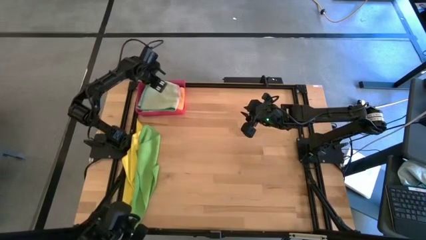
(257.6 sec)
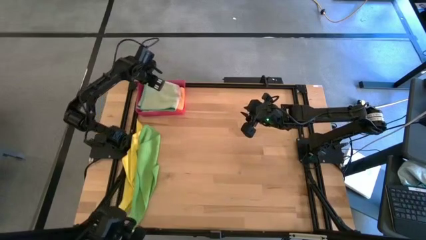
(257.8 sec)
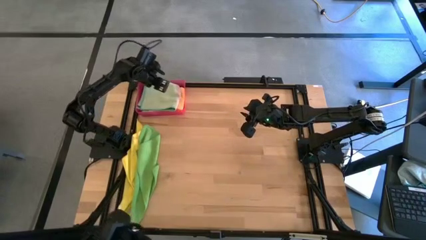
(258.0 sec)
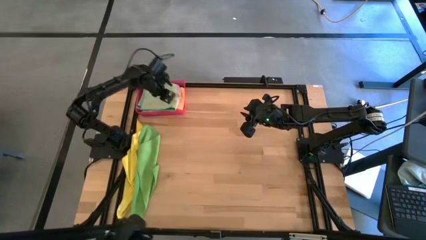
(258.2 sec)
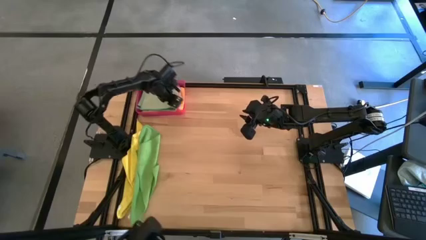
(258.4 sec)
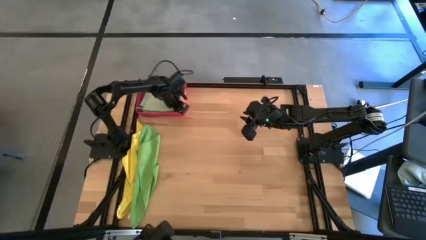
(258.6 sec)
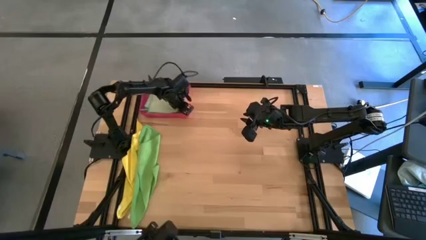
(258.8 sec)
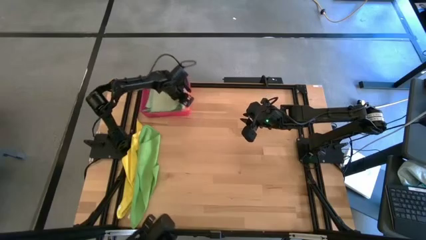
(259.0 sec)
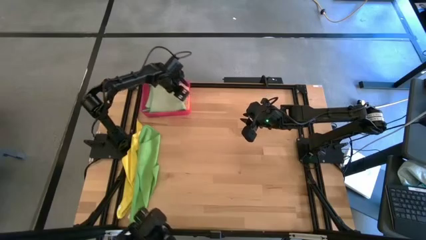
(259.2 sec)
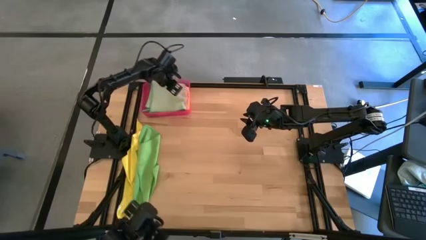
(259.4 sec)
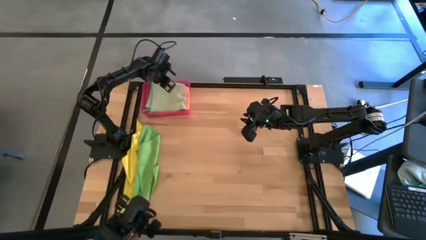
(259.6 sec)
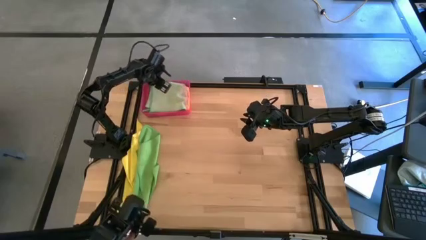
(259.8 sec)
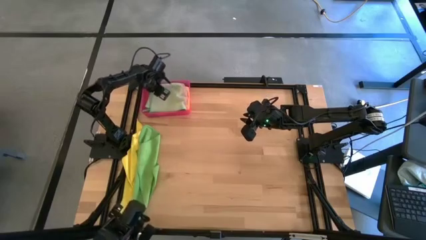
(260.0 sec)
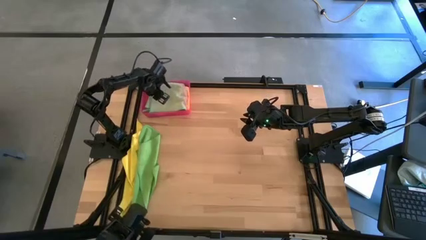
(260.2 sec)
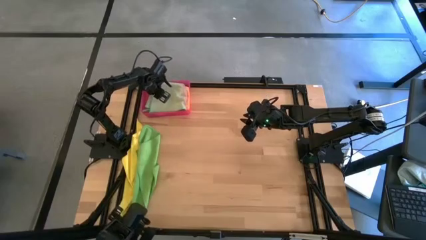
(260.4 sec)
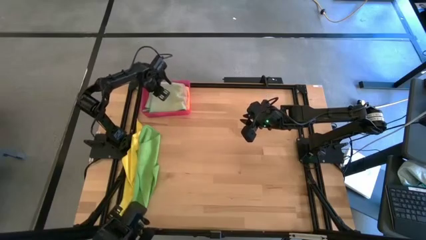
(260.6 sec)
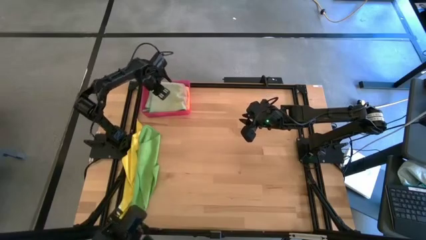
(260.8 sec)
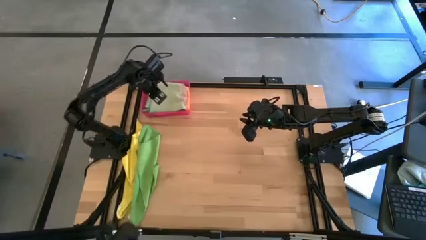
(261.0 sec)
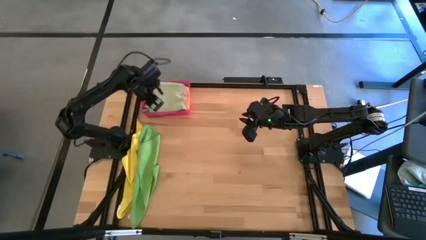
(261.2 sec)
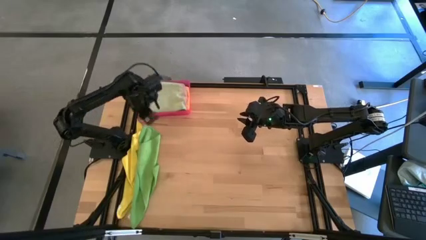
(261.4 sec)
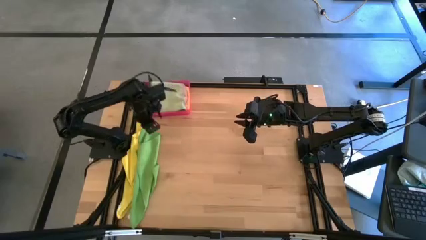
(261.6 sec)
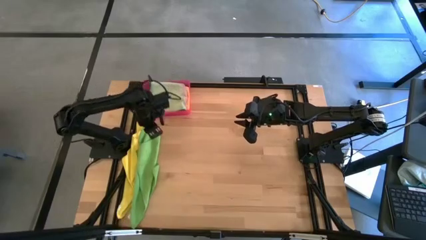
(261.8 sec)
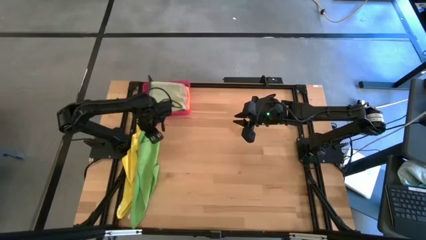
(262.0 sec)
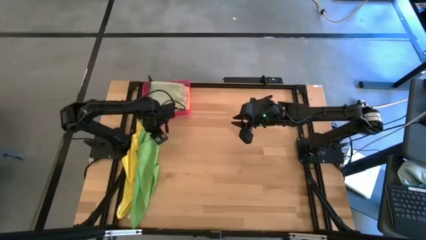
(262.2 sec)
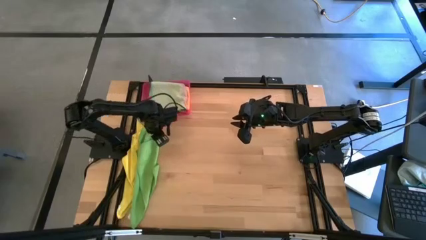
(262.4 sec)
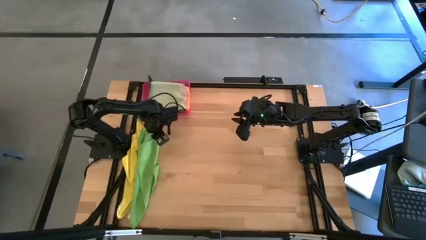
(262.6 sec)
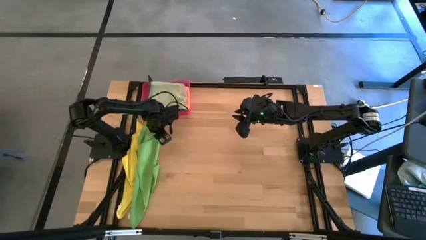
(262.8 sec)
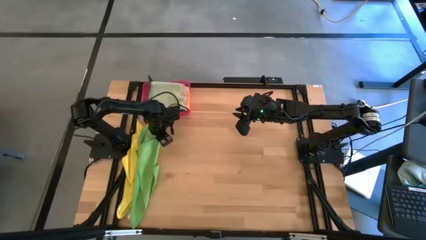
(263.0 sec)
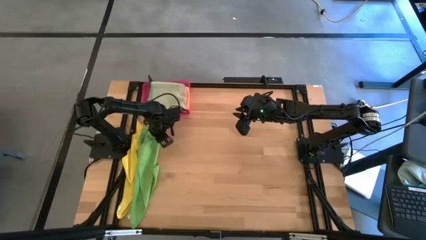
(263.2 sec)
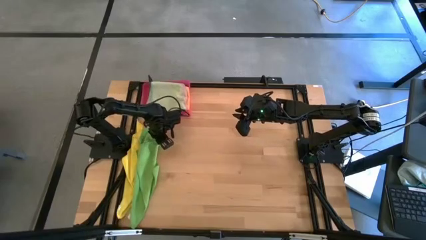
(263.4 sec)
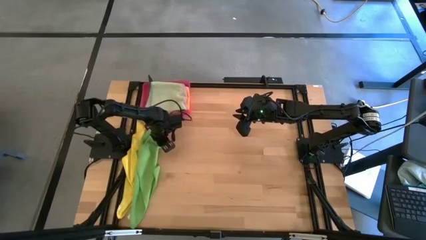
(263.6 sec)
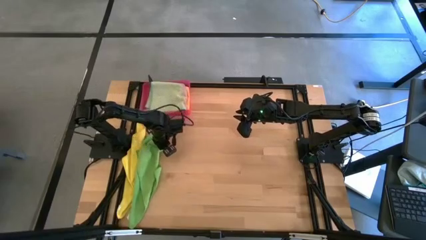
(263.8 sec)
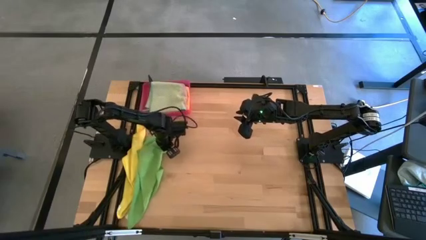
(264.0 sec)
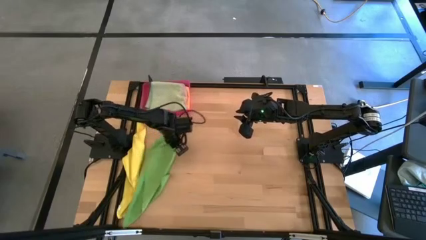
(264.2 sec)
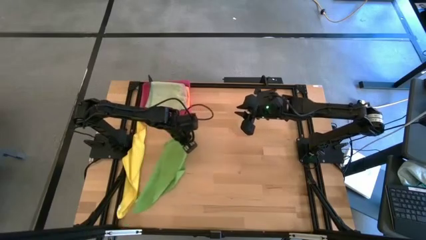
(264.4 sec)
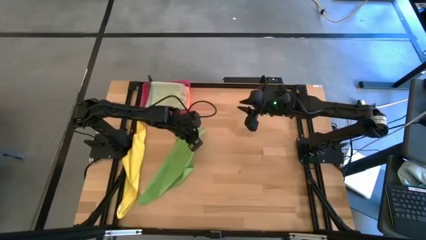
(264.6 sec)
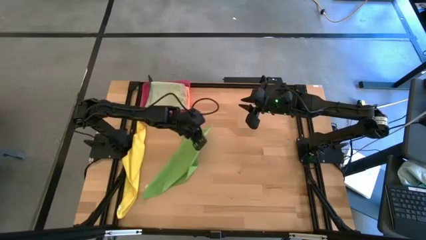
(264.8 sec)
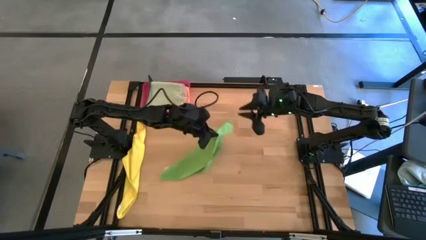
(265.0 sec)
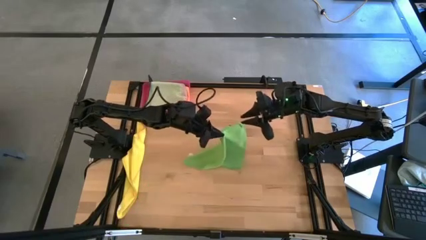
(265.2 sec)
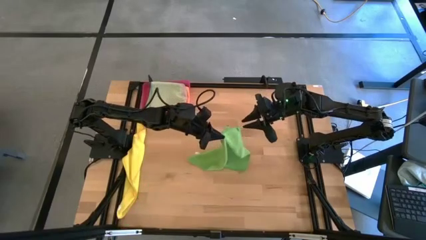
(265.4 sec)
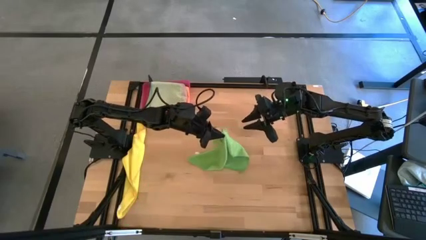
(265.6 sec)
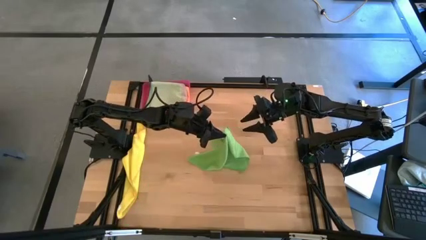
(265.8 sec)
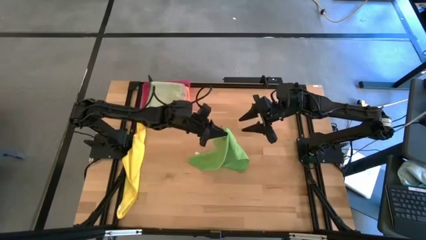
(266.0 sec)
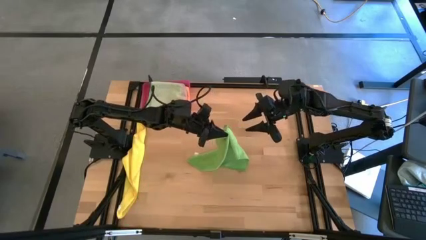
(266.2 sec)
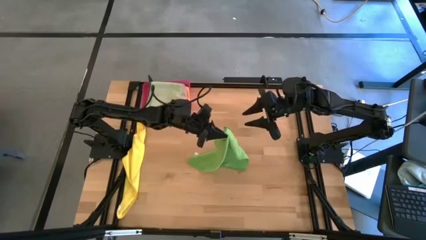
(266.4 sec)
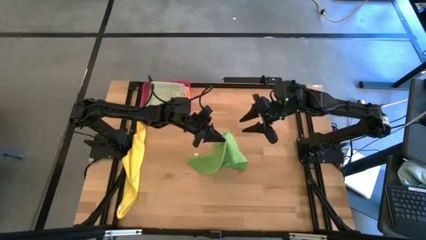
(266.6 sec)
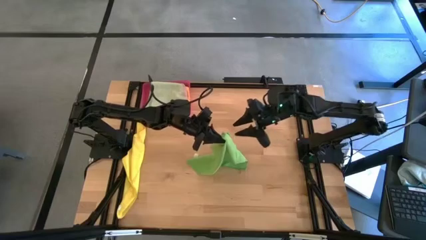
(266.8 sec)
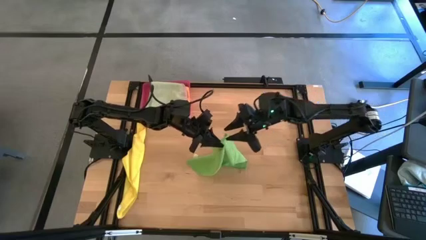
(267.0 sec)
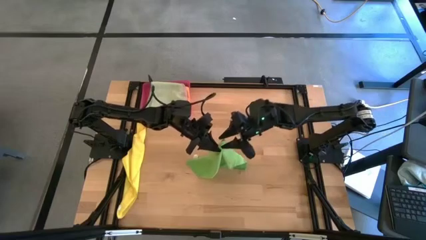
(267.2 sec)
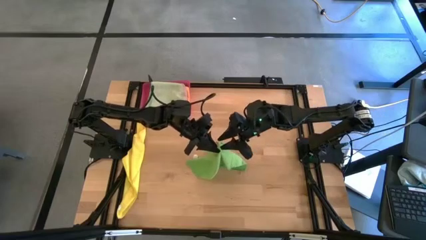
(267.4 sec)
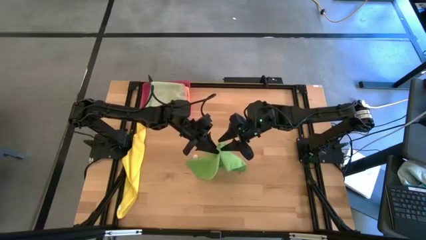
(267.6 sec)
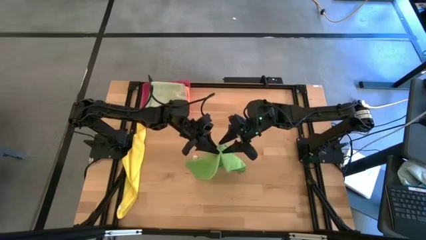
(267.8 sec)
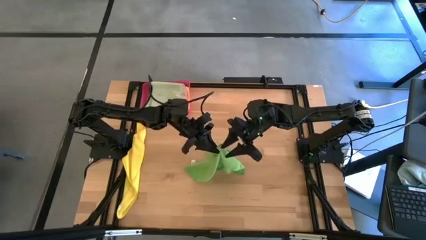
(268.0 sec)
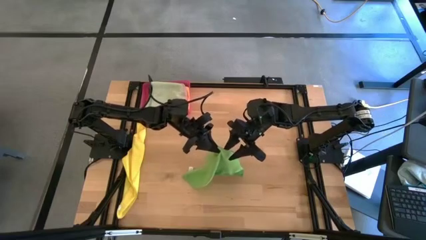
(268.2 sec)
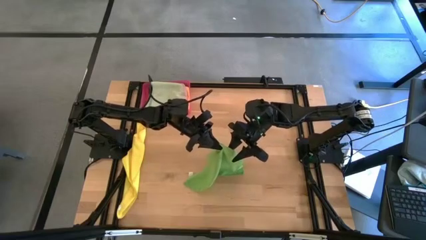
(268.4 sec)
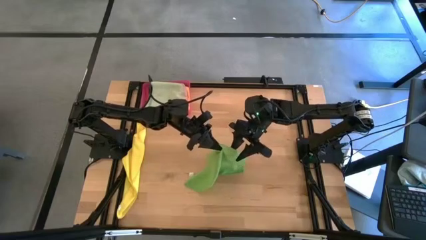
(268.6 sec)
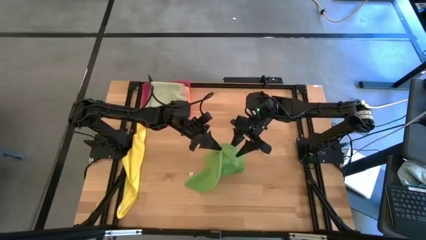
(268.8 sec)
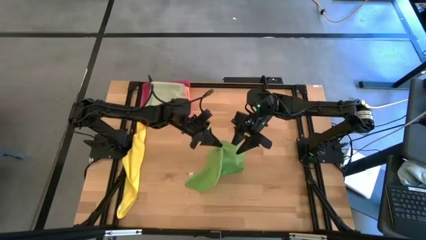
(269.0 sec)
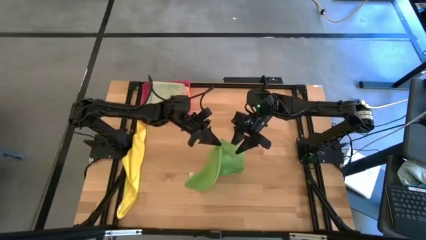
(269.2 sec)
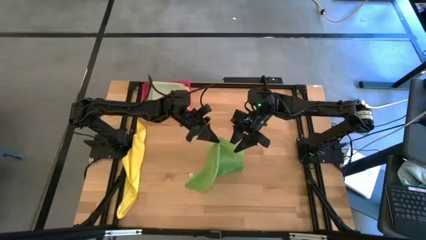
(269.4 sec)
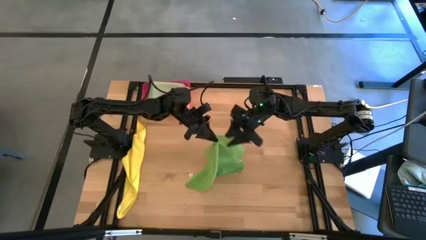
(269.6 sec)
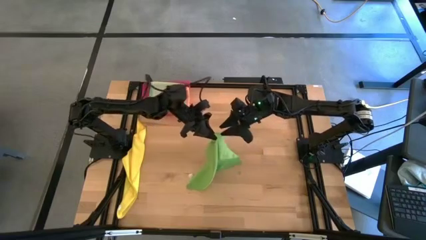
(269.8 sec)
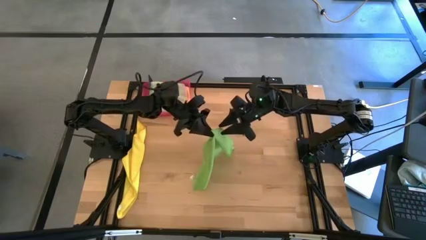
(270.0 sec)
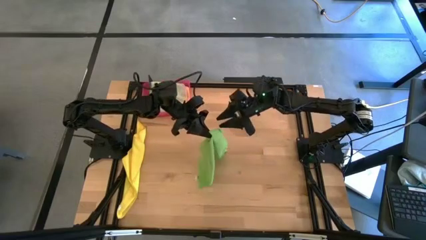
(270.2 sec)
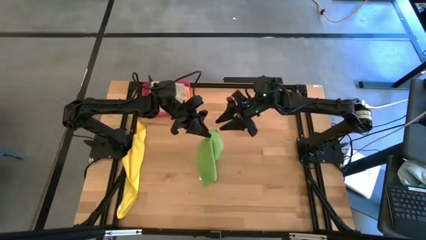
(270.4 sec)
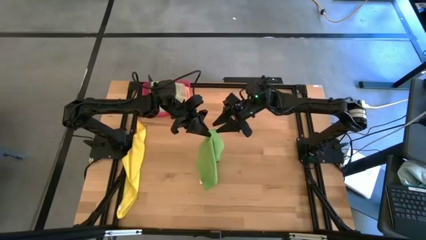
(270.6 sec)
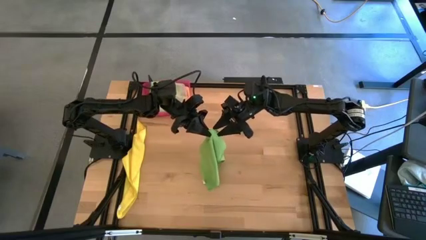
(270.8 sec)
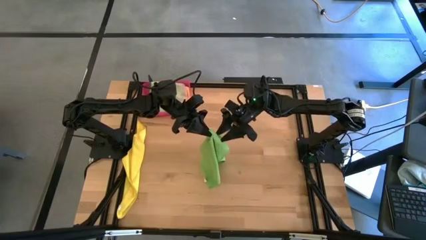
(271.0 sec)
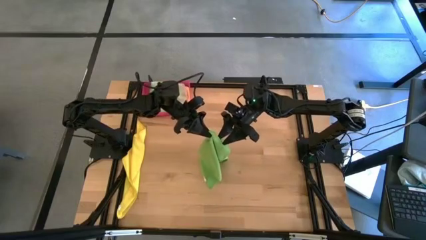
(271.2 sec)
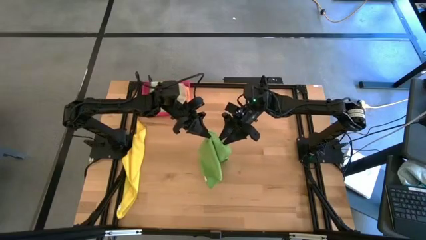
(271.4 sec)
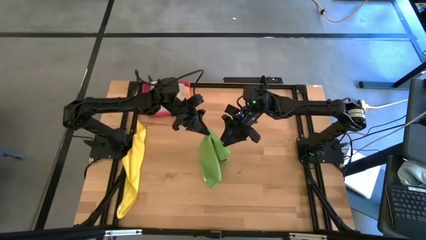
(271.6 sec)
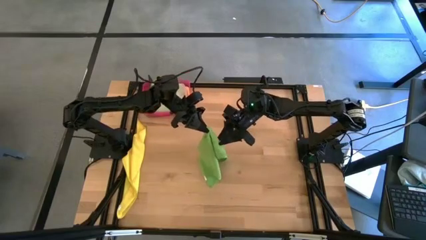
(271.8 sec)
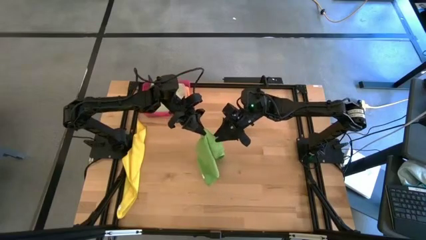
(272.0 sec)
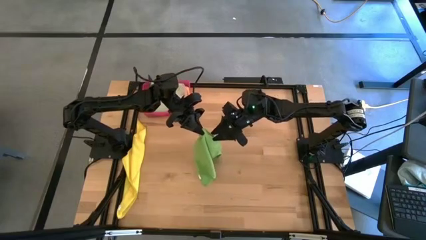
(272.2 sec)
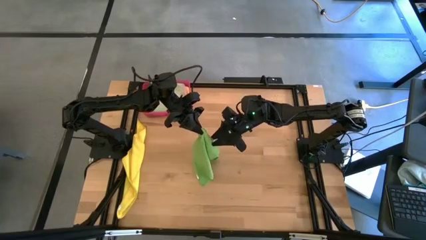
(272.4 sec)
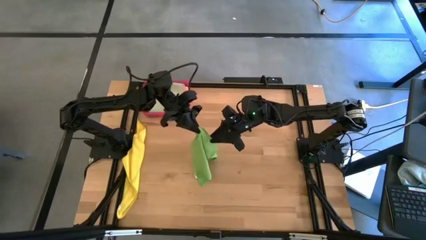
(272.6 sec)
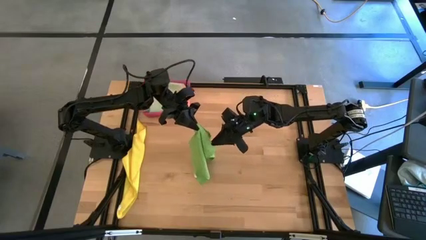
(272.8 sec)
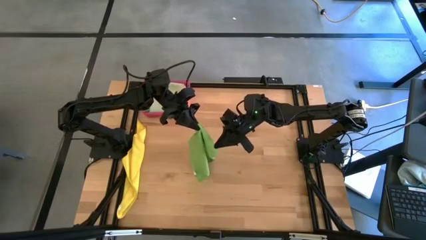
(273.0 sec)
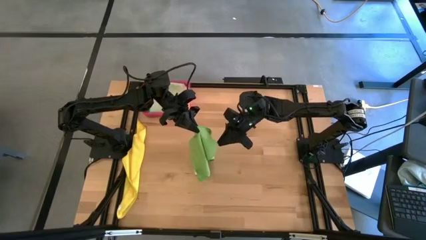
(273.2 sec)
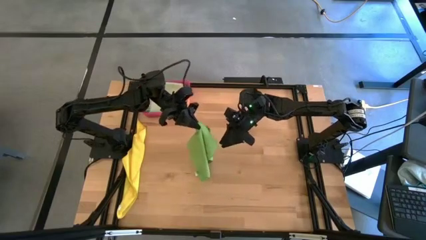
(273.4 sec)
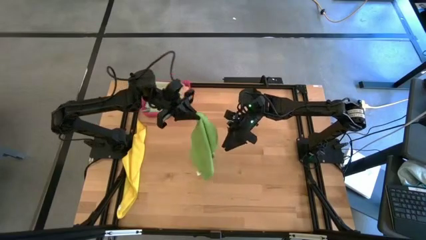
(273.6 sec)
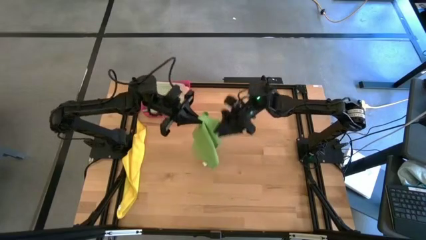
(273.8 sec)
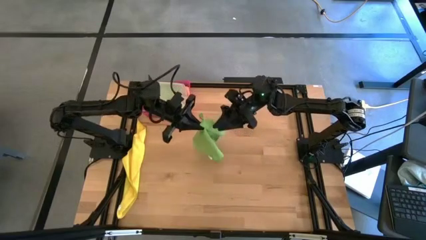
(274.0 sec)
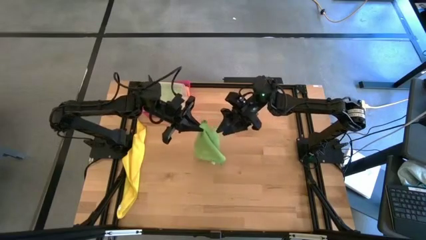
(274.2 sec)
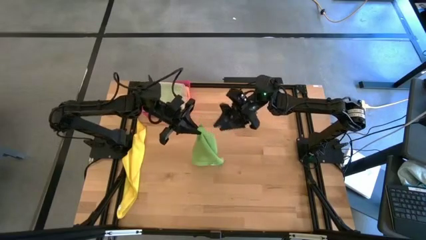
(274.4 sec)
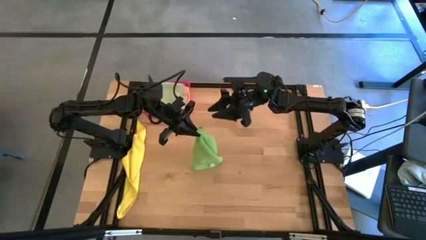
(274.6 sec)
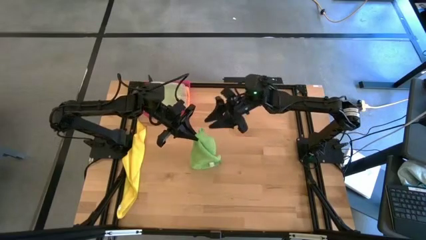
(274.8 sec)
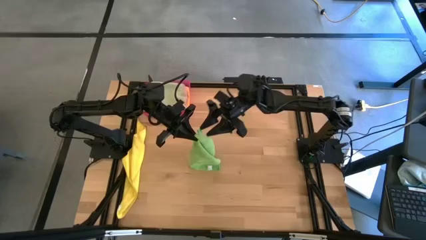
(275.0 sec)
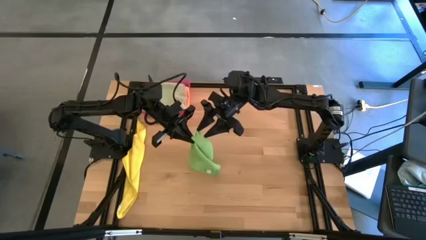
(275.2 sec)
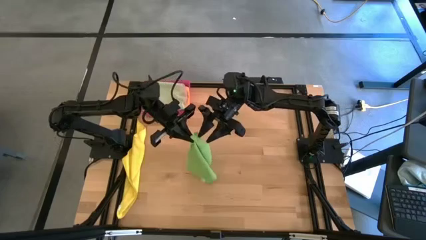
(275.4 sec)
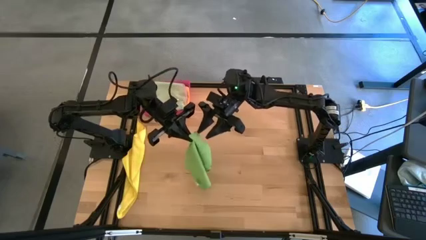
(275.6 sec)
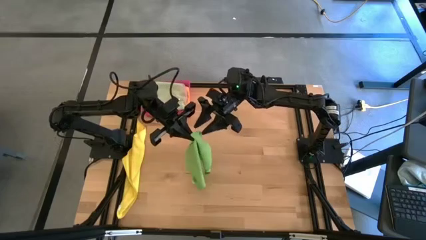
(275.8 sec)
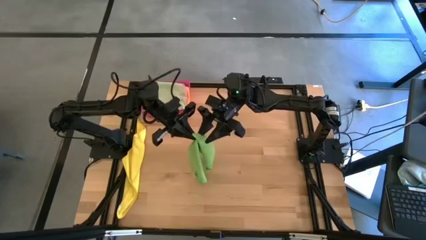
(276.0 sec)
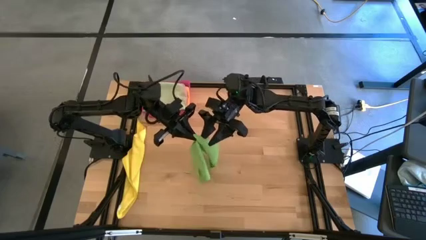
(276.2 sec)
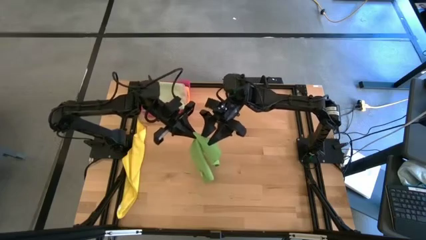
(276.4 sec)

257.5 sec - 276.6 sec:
Task: Fold microfiber towels
Fold the green microfiber towel
